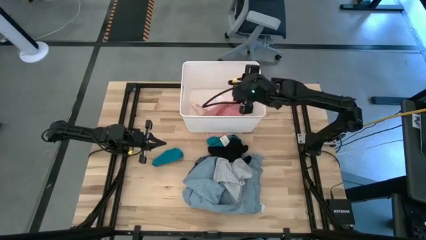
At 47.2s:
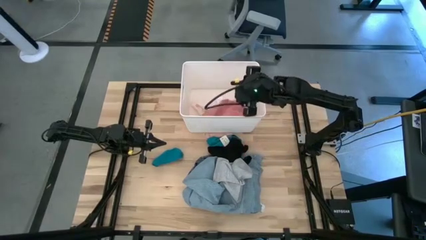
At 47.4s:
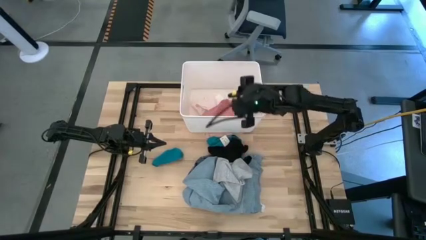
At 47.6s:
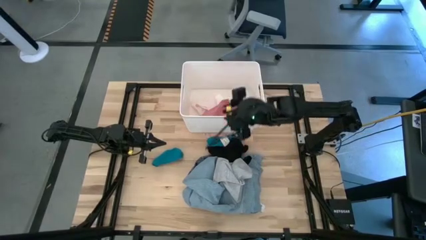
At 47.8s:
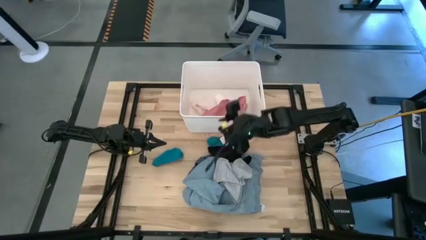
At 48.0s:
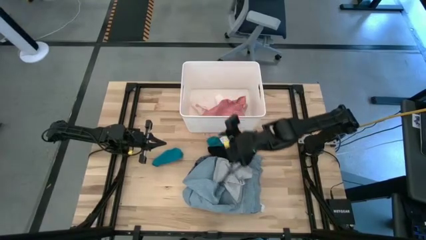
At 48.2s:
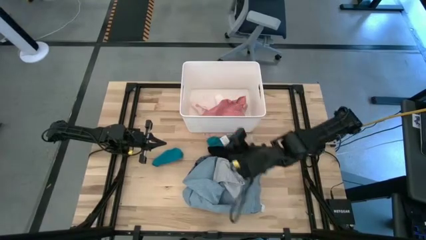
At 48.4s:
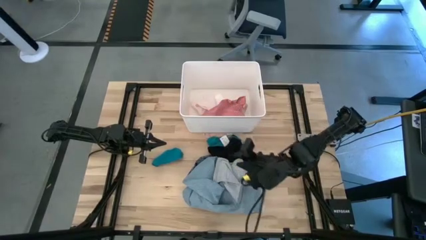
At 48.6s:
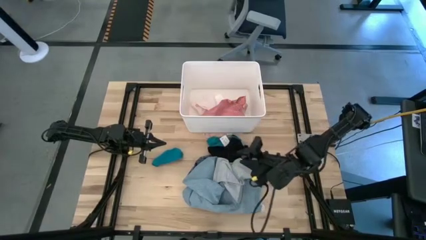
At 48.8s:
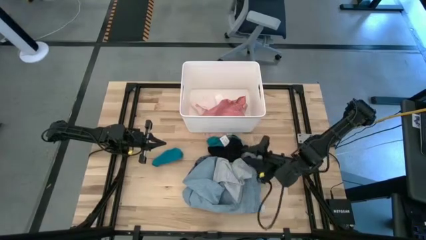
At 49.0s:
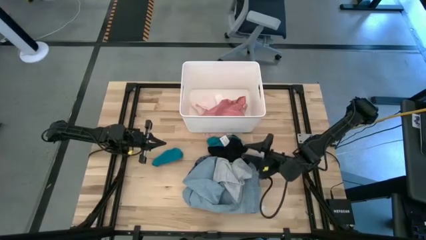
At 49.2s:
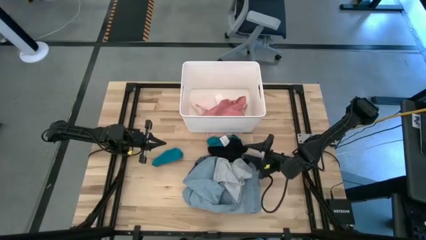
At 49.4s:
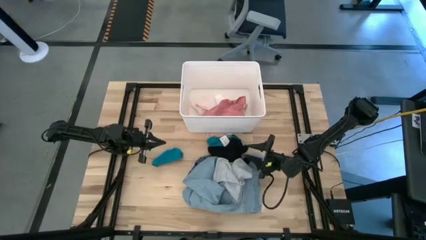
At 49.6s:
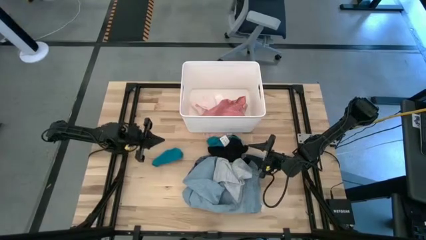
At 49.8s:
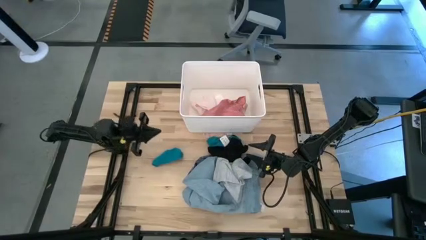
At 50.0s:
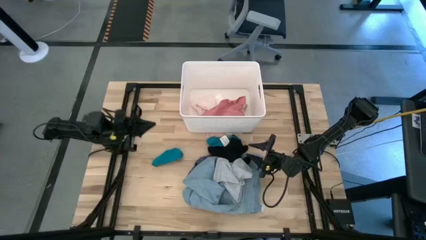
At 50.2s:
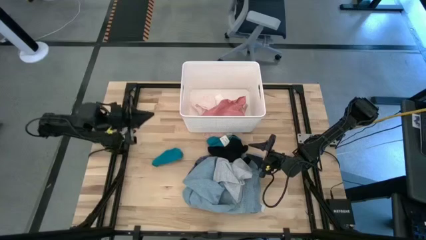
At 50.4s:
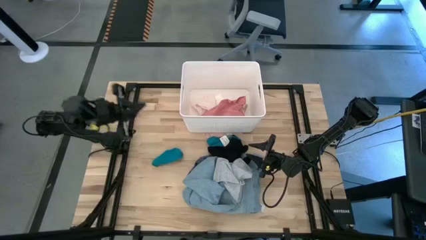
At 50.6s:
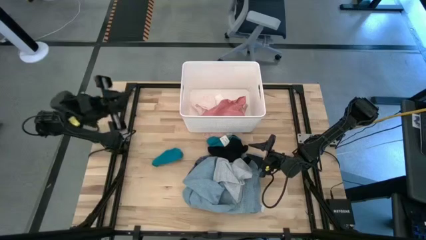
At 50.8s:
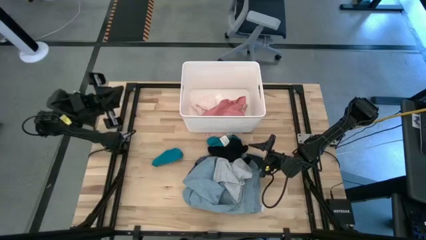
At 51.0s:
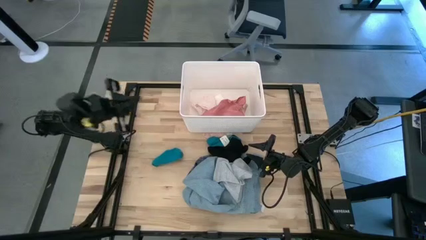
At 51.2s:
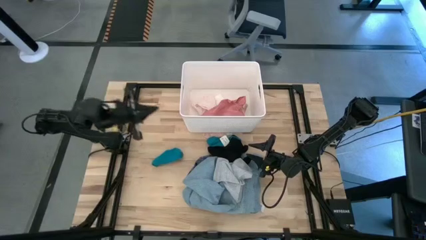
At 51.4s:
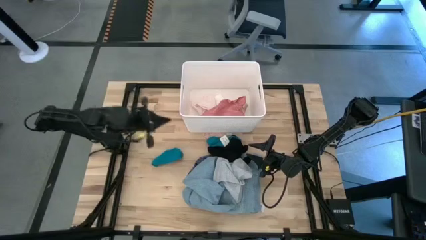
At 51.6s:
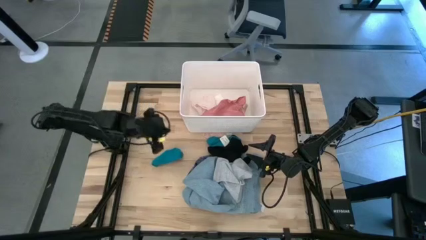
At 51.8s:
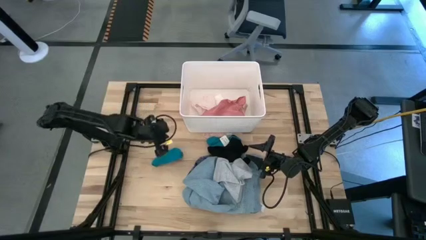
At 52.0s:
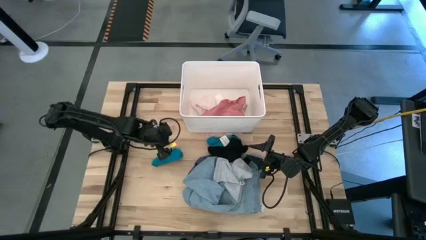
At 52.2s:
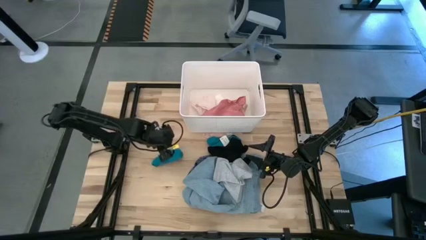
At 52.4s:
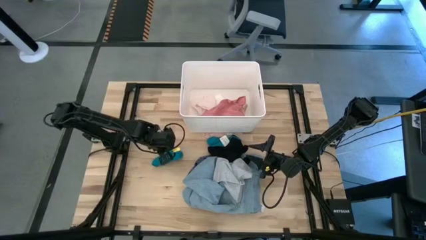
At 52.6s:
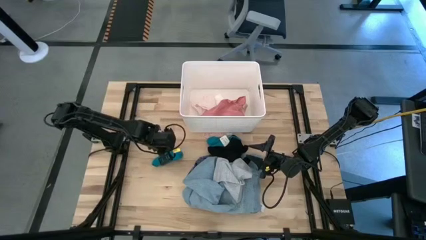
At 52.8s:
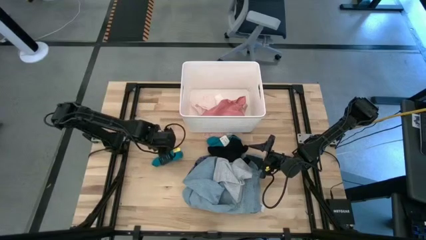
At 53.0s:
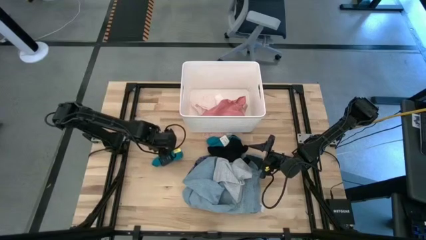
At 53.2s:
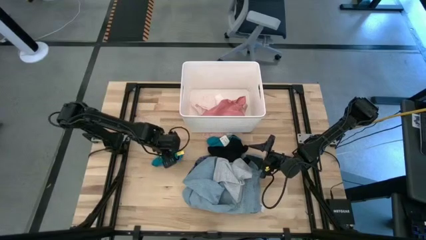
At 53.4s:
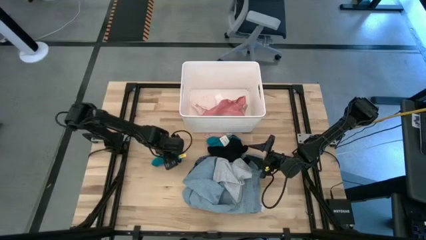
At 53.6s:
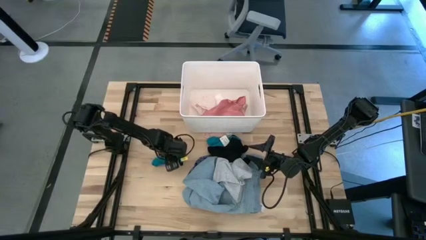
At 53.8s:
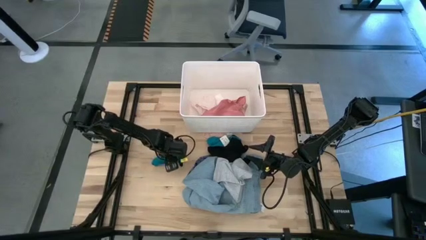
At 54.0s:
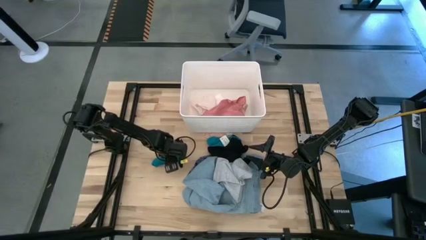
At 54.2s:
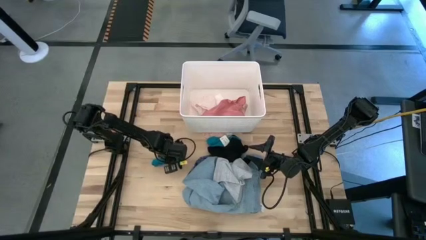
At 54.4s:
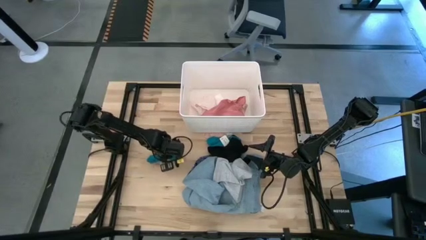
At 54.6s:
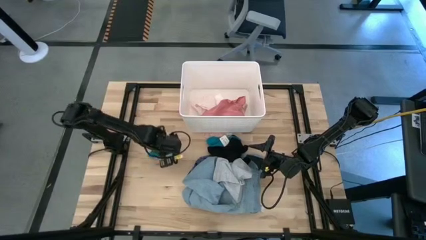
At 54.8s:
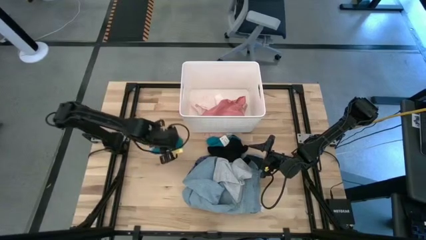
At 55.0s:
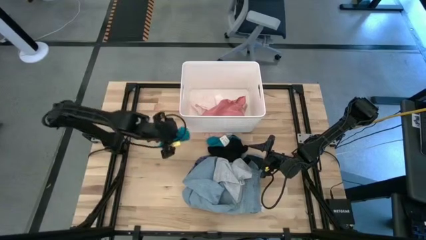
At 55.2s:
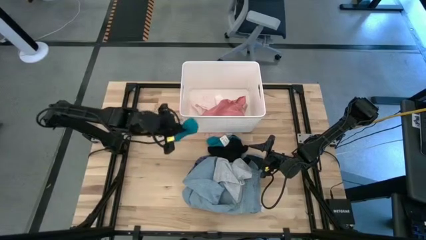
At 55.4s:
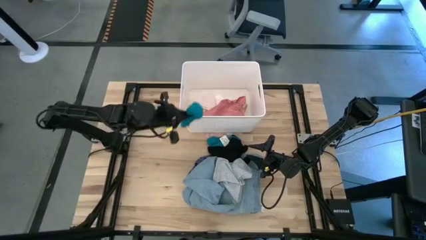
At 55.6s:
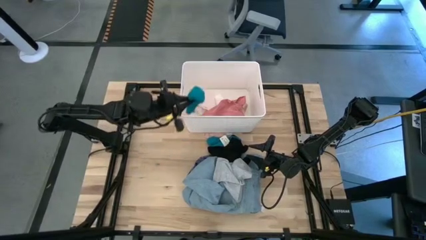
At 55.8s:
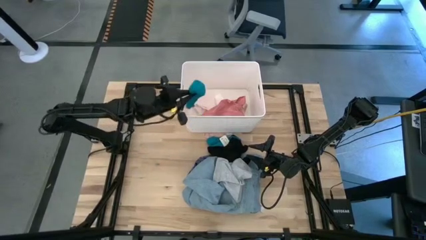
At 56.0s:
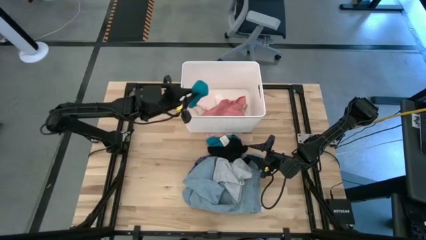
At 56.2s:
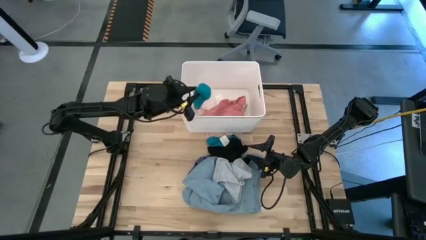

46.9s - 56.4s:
Task: Sort clothes
Put the left blue sock into the white laundry bin

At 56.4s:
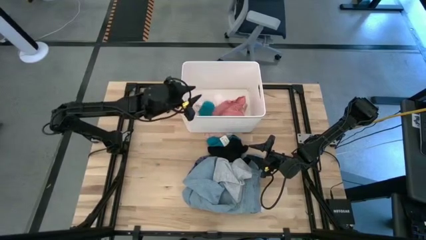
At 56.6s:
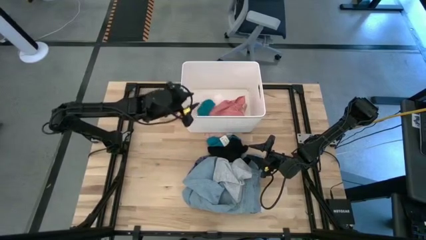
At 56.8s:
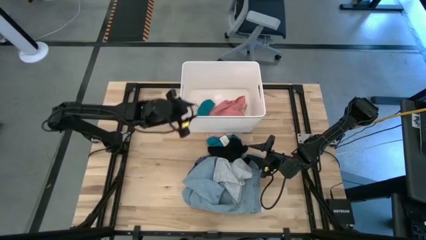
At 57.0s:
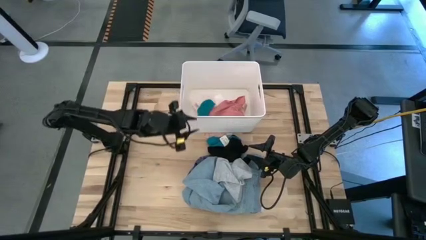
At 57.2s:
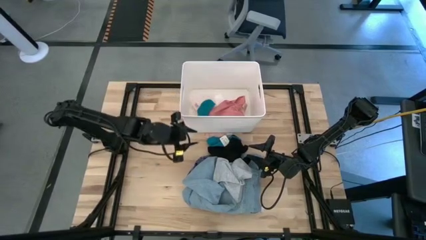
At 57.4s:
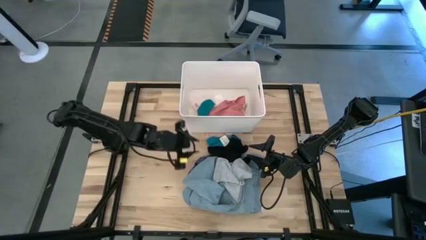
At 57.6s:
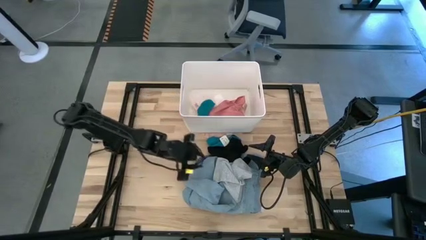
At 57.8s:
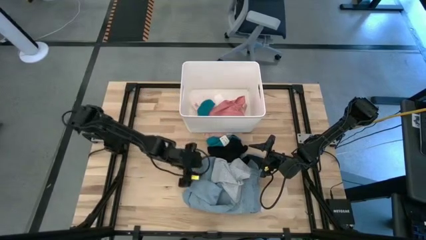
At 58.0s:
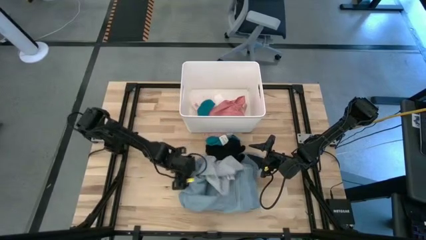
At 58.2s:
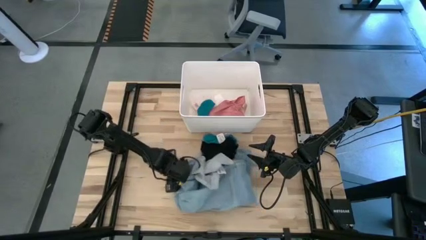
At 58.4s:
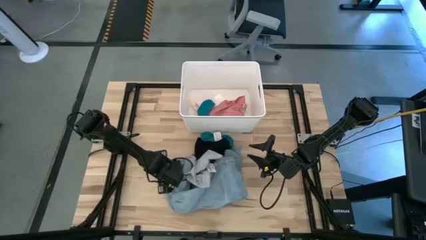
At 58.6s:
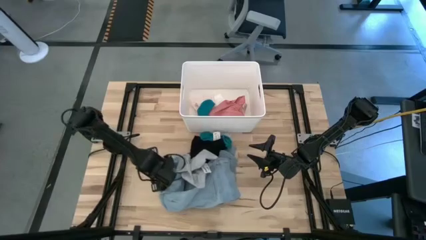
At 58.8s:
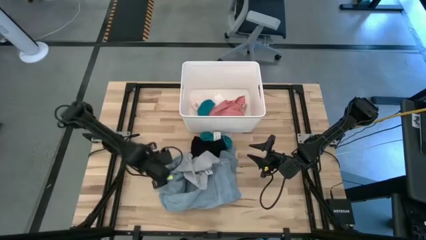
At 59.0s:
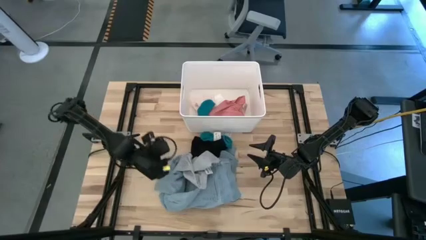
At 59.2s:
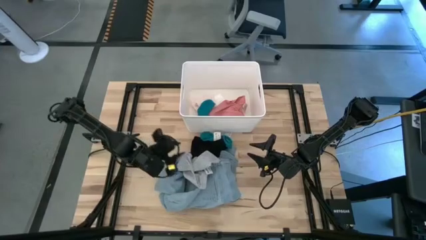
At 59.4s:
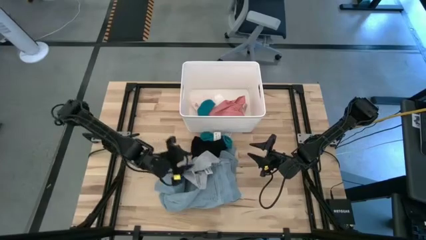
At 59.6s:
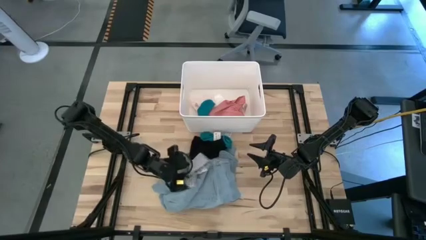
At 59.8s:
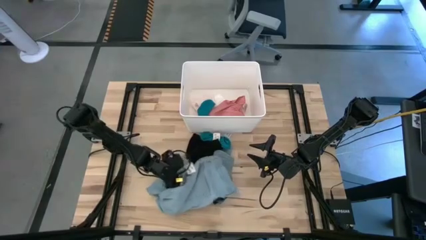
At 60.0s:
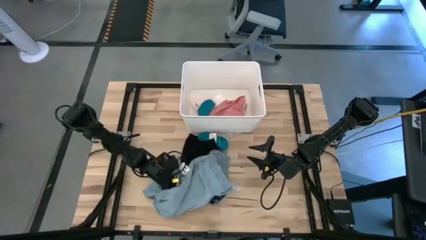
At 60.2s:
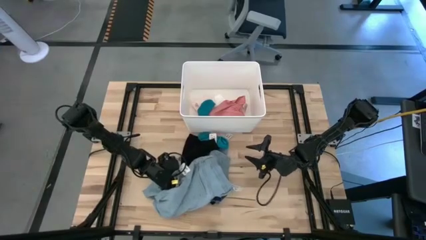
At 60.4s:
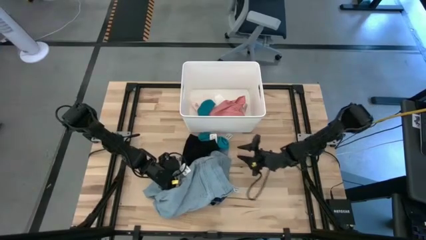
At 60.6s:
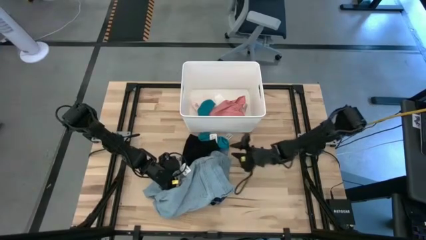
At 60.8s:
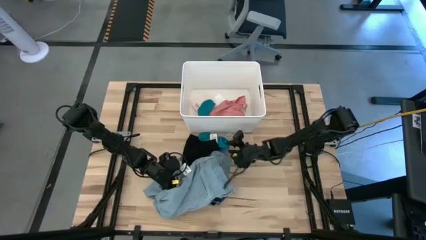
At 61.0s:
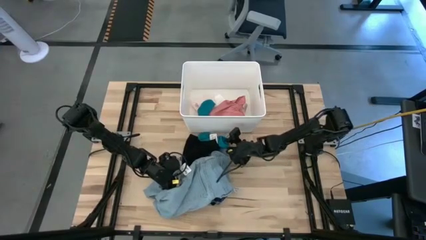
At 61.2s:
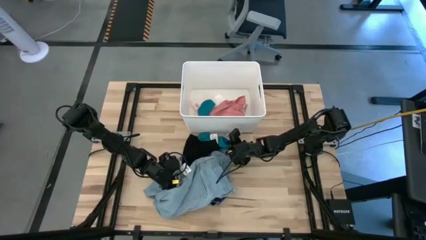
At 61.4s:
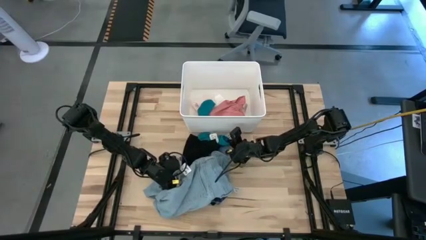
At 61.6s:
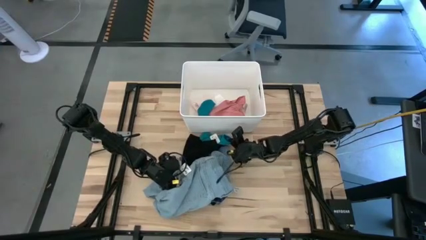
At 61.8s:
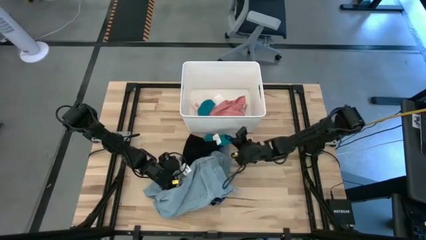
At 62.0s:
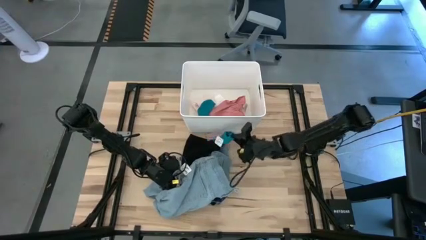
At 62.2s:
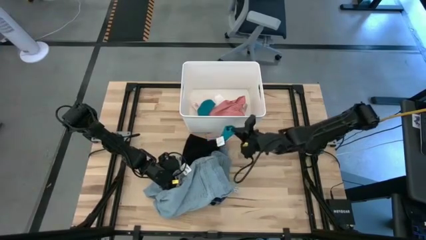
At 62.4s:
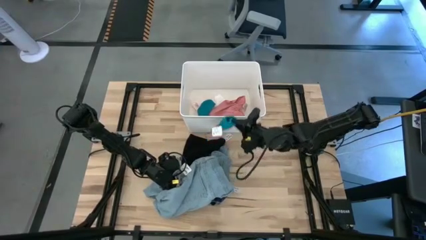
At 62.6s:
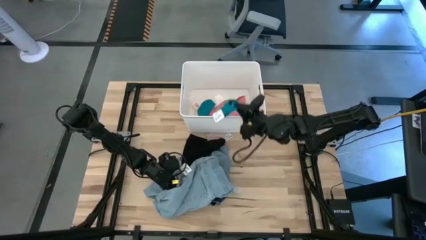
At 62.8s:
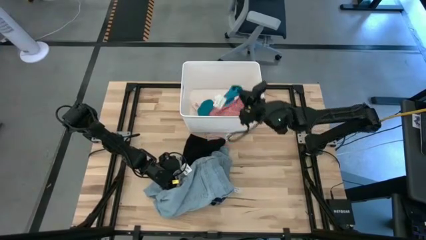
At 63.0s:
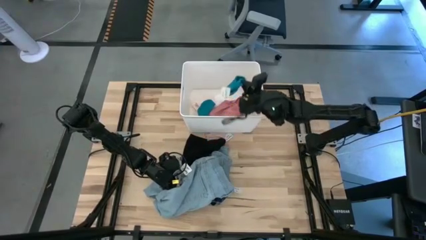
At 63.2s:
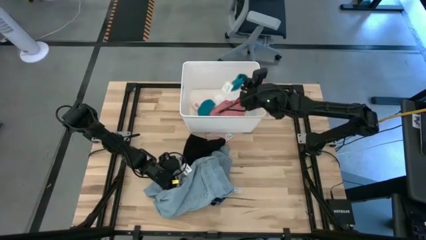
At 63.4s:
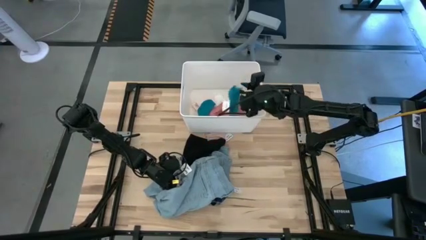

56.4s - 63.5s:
Put the blue sock into the white laundry bin

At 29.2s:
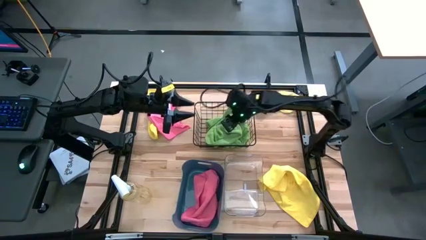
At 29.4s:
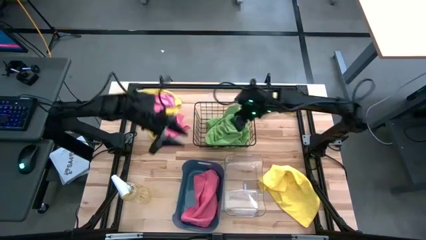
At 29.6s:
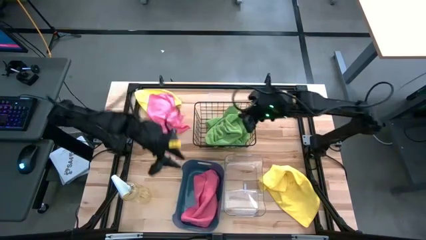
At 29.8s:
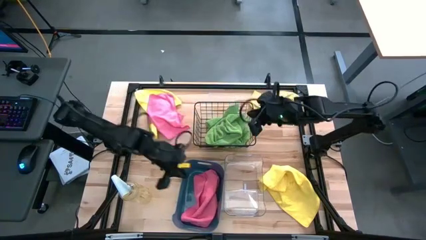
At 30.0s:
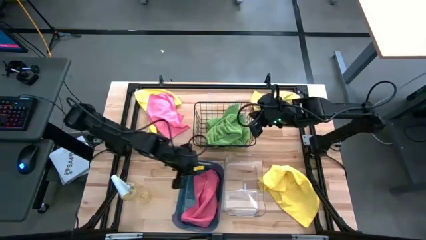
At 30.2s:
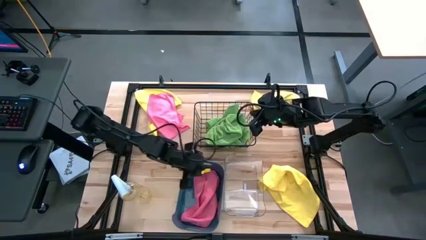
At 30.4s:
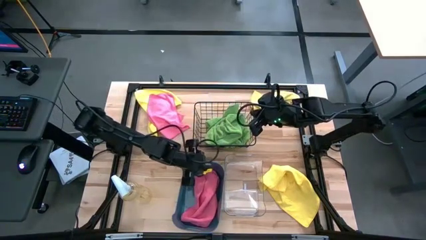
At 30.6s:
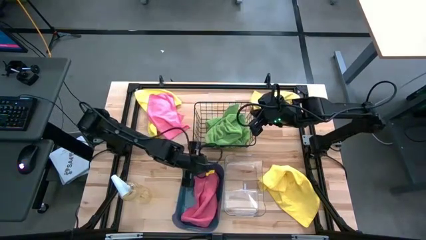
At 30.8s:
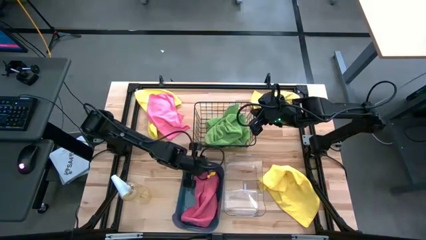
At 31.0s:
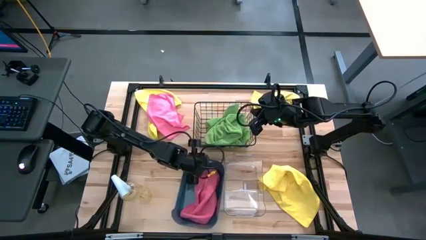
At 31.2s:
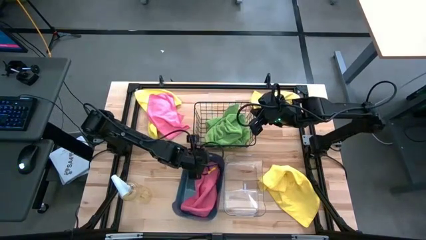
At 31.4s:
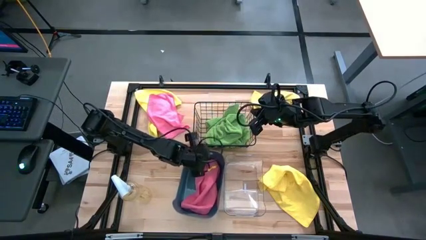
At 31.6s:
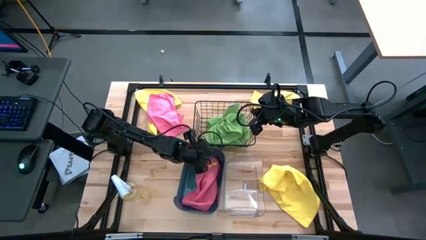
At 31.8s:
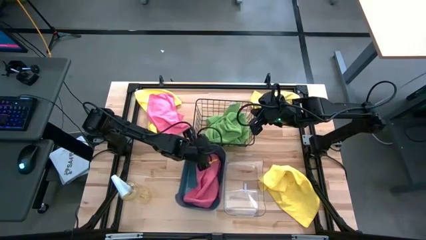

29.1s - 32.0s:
Task: Sort microfiber towel by color & place in baskets
Move the blue bin to the center
